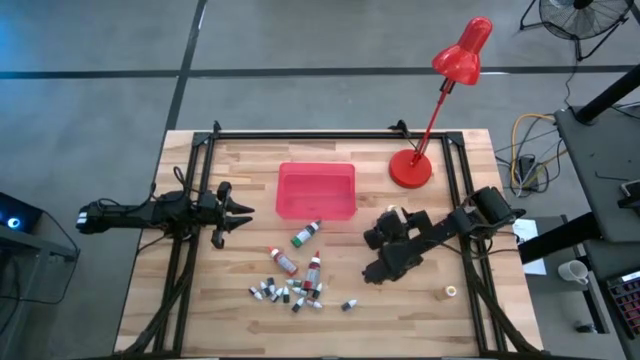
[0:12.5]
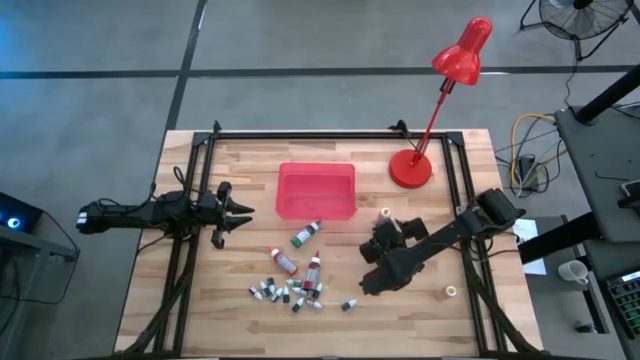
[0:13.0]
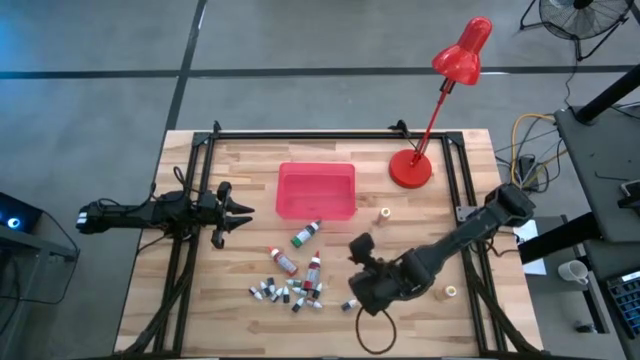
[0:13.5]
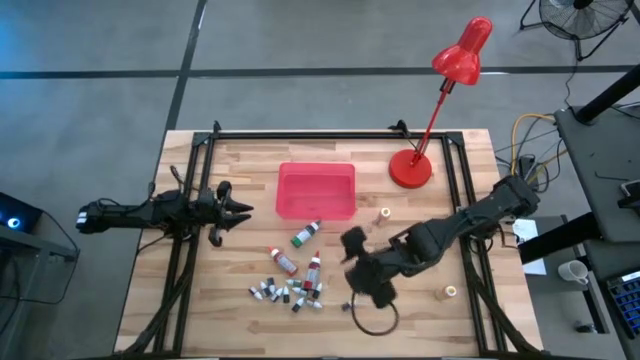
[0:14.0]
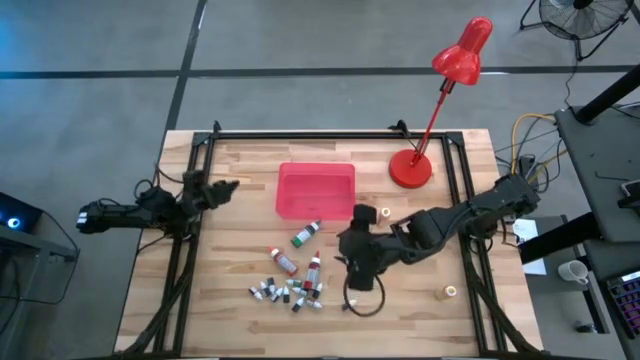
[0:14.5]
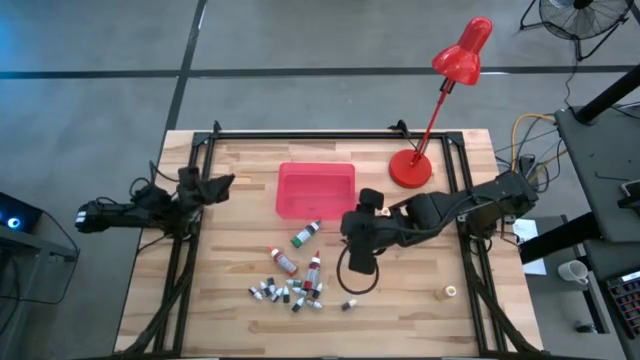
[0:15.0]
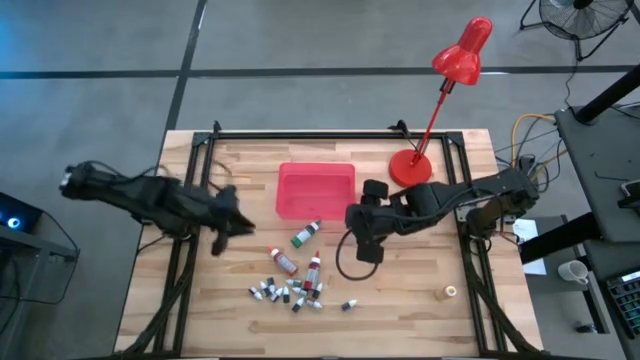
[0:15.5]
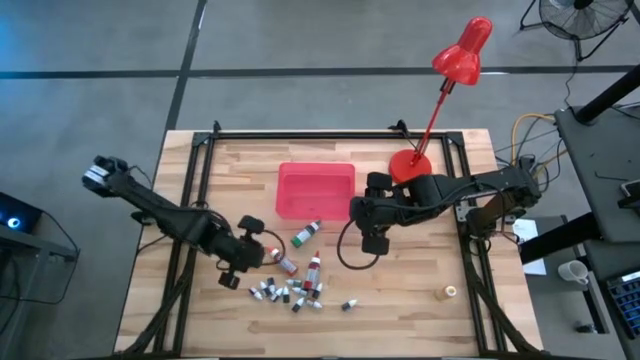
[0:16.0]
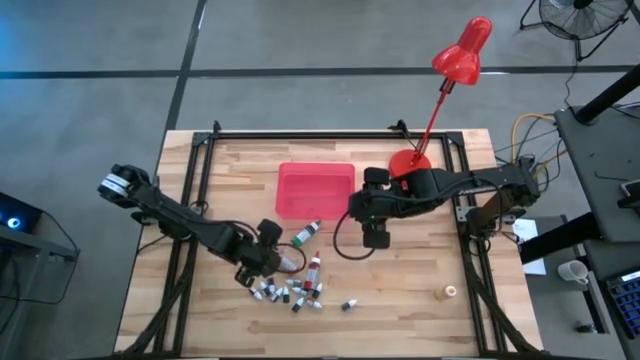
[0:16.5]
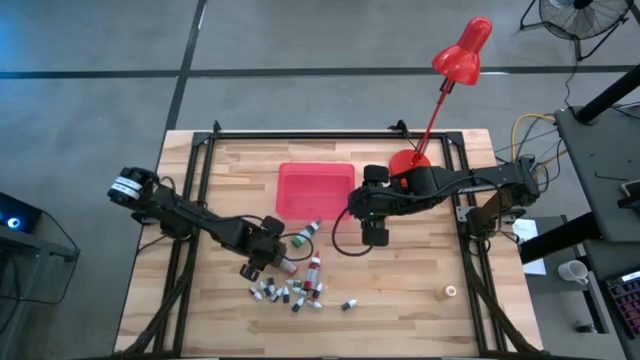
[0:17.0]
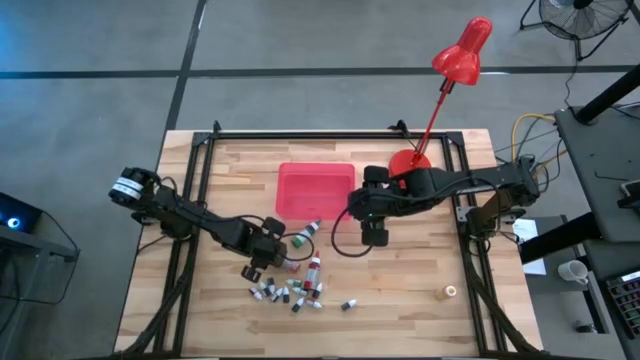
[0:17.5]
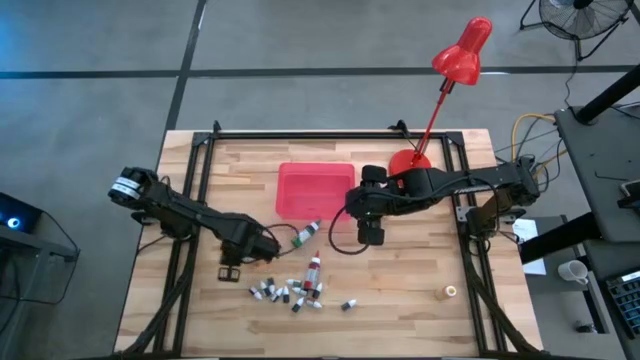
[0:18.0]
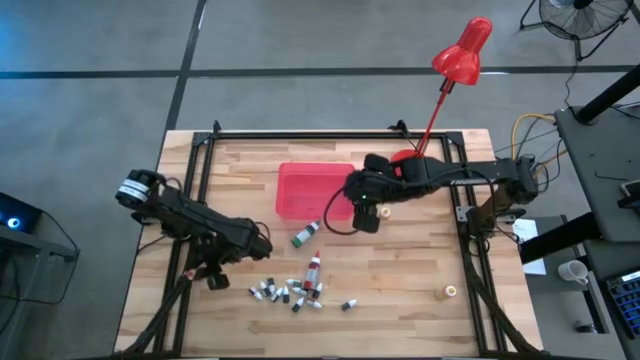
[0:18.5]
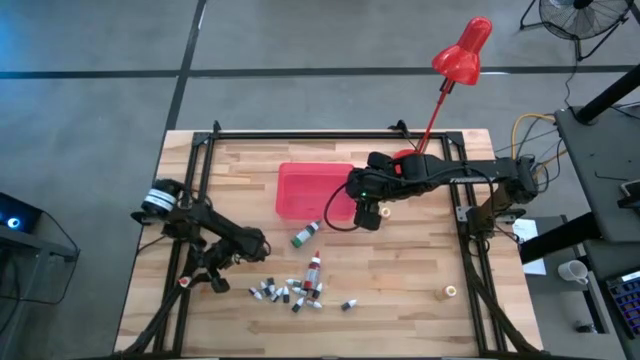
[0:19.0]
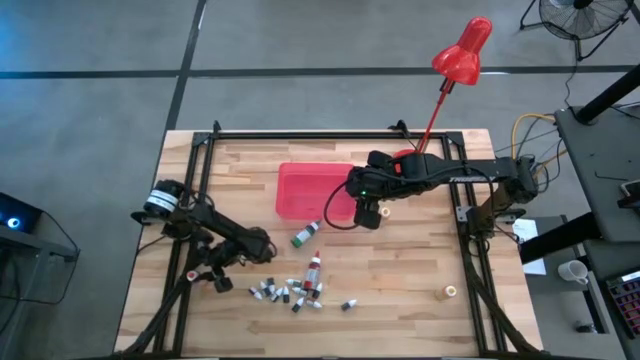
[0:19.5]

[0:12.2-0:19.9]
Task: Pick & Place food coloring
Adjust the big orange food coloring bottle

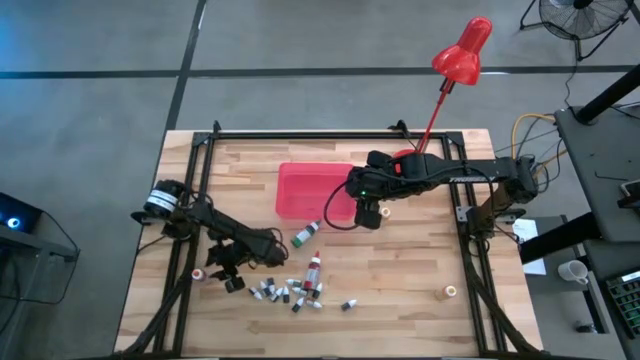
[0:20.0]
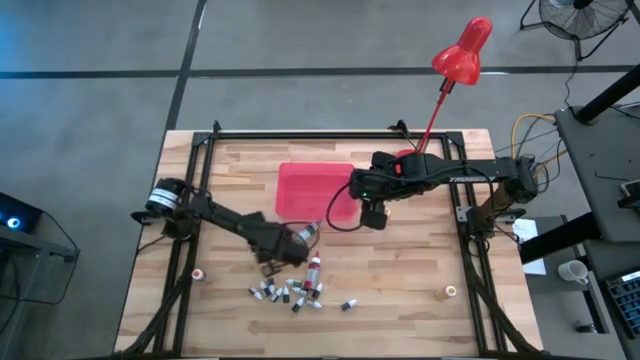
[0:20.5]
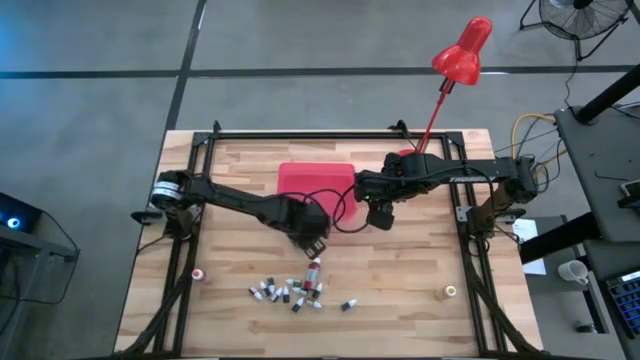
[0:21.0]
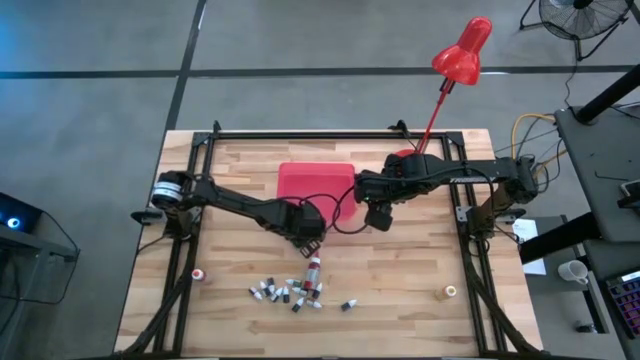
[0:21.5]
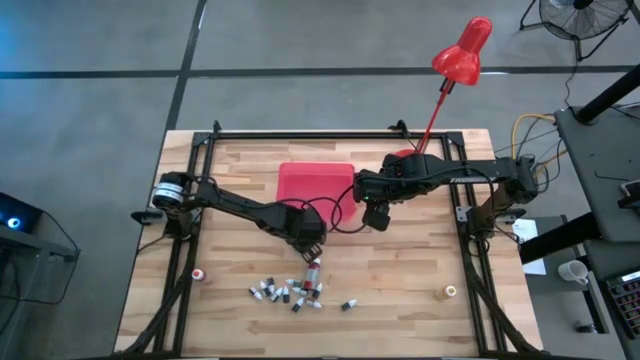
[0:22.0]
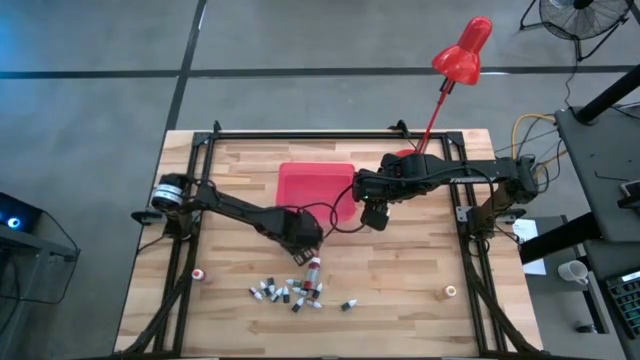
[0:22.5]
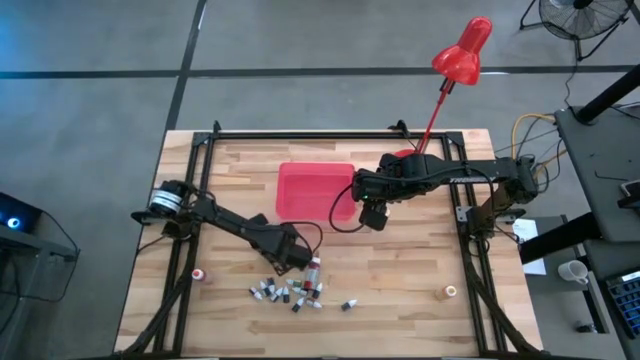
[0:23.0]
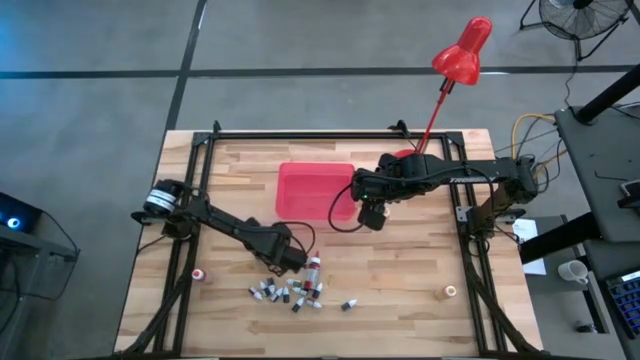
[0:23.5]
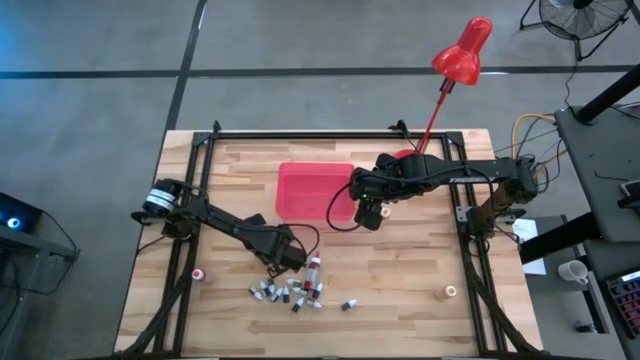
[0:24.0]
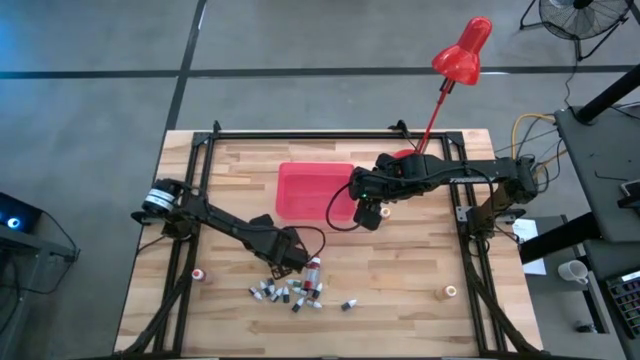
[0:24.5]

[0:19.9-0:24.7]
Put the big green food coloring bottle into the pink bin

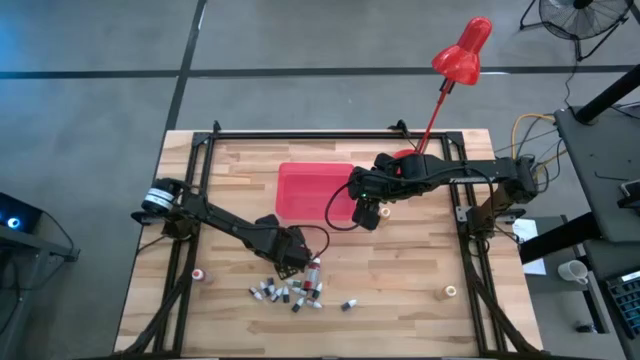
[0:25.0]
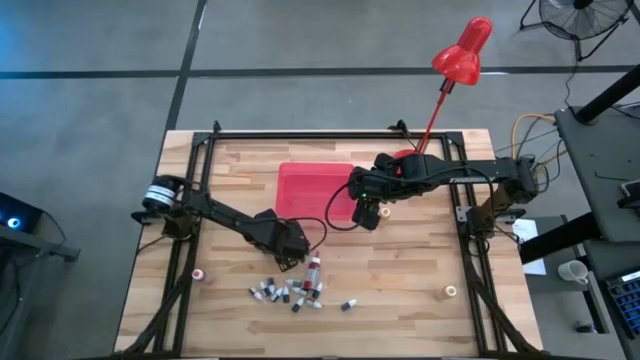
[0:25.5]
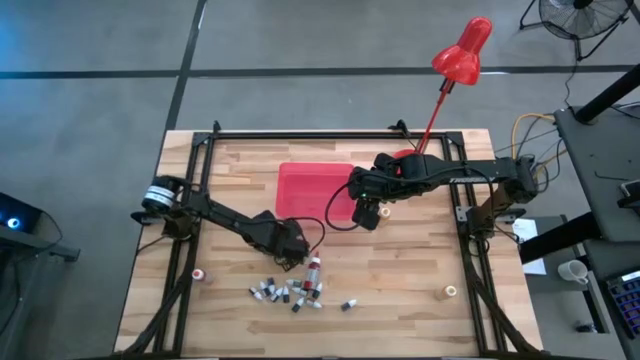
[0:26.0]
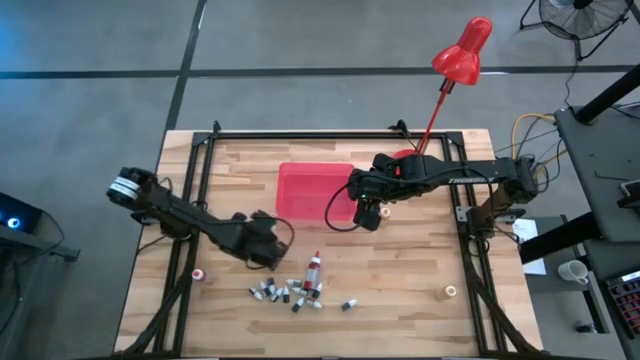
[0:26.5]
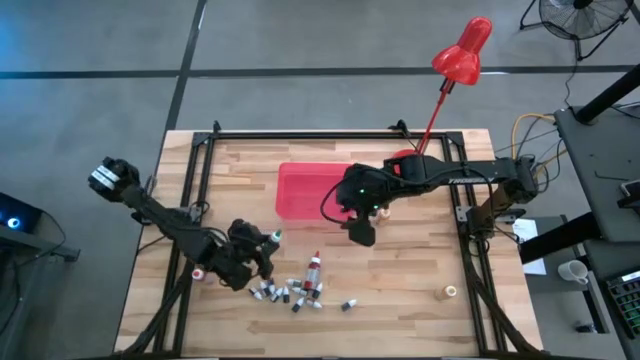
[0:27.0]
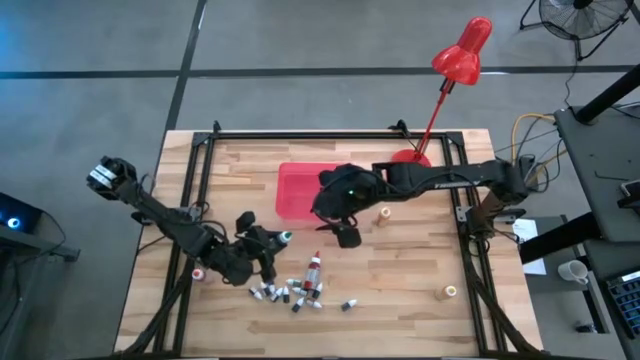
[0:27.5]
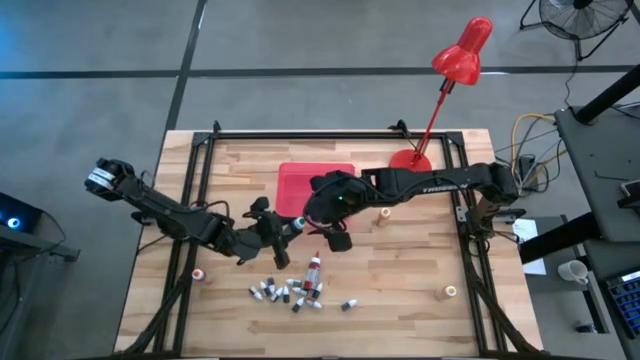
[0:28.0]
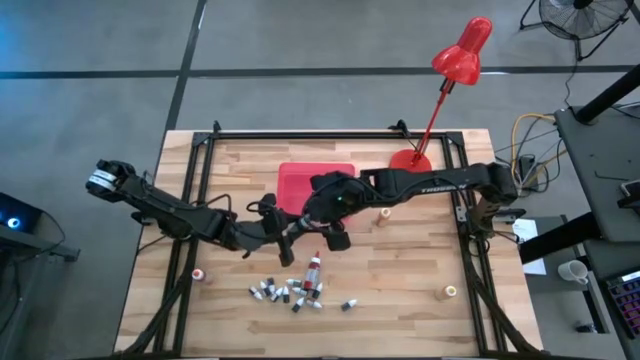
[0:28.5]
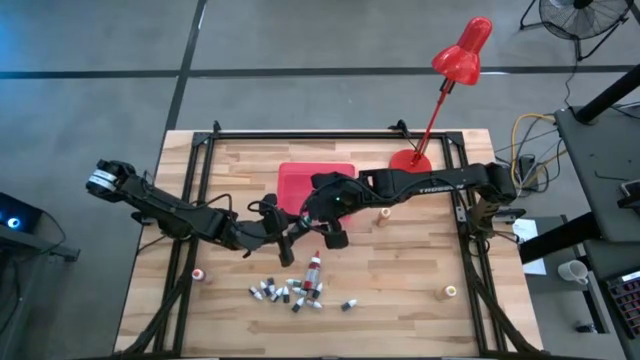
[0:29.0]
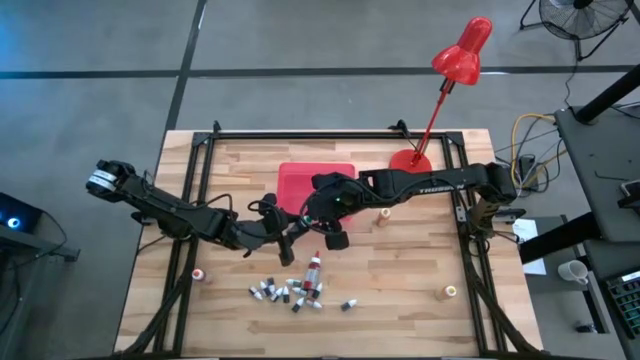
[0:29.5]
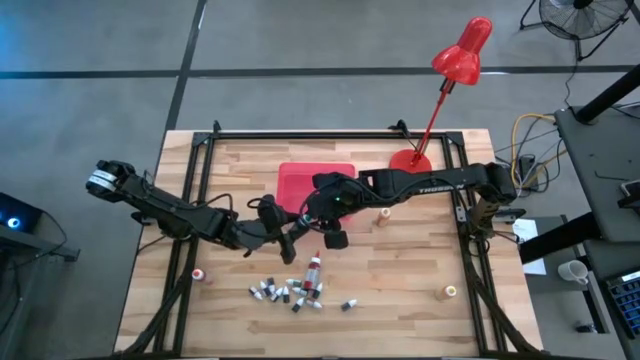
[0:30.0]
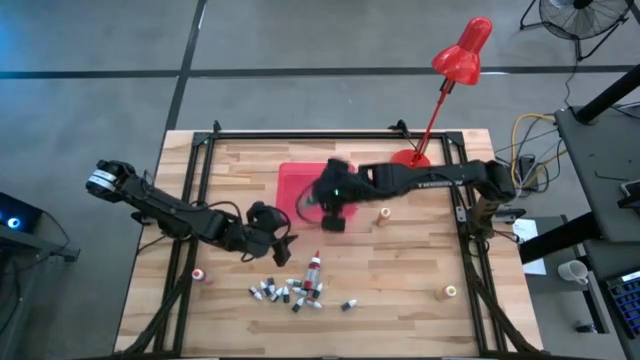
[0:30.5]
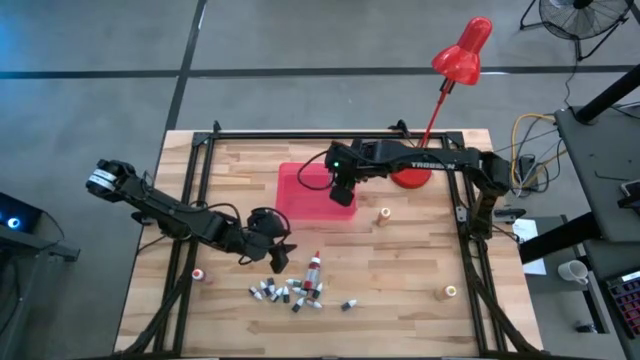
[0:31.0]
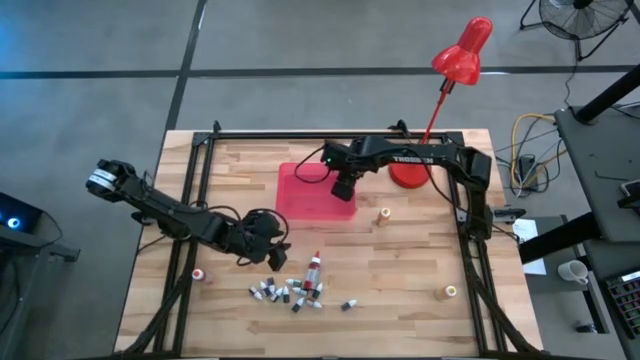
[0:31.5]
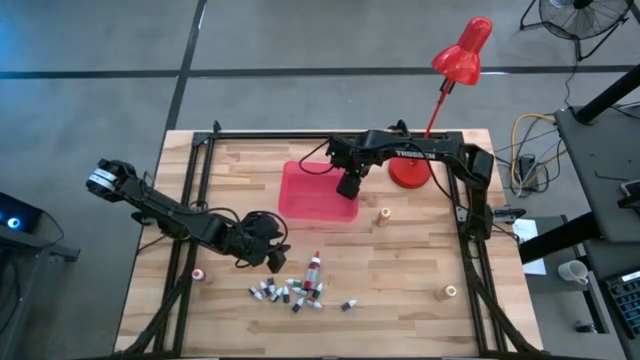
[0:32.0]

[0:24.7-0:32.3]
Put the big green food coloring bottle into the pink bin

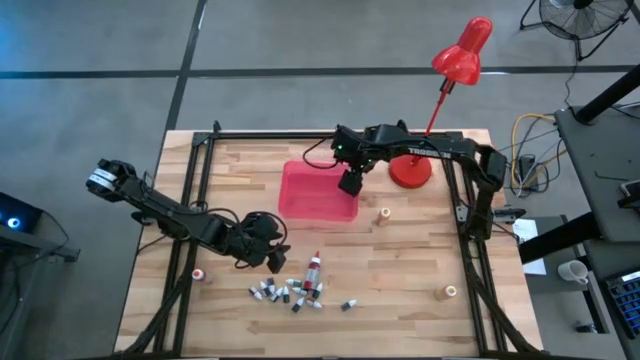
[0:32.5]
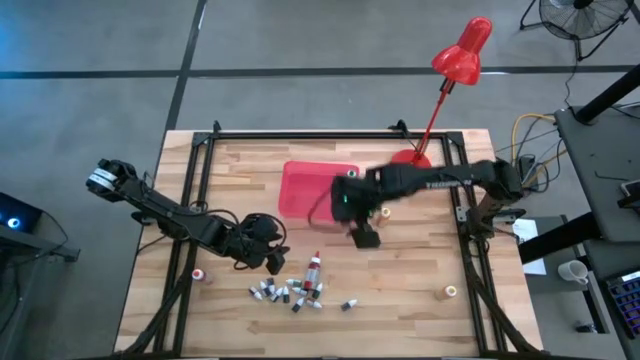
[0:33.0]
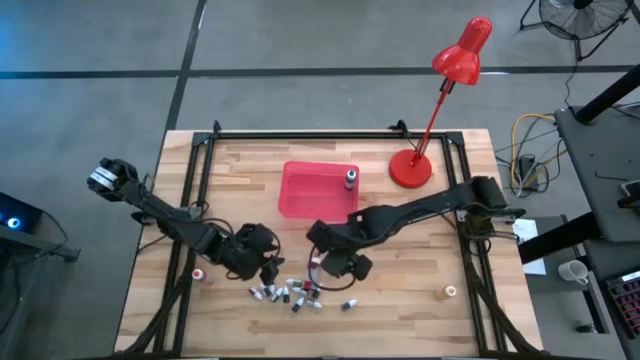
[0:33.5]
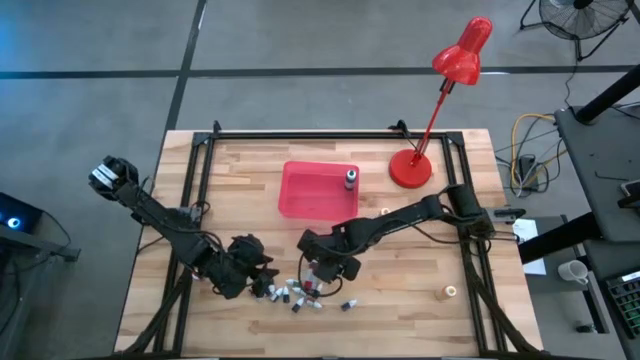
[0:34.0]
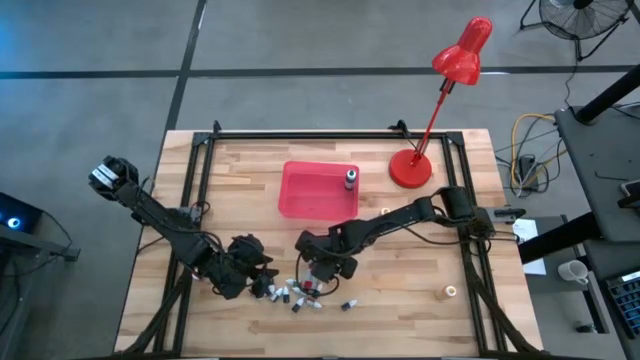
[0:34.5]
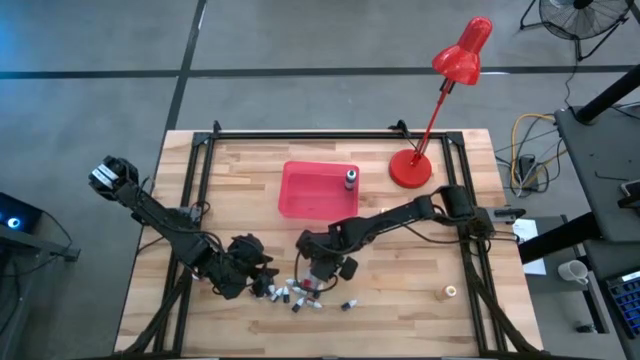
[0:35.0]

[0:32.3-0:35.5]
Put the big red food coloring bottle into the pink bin
